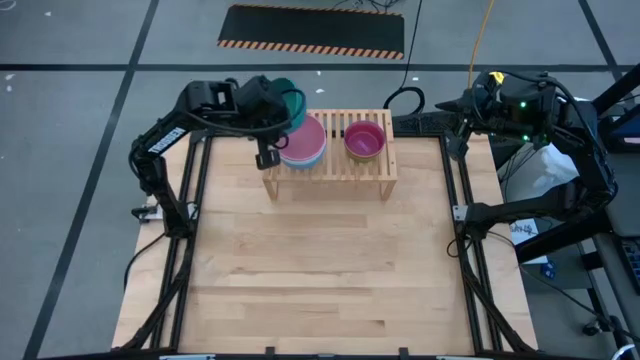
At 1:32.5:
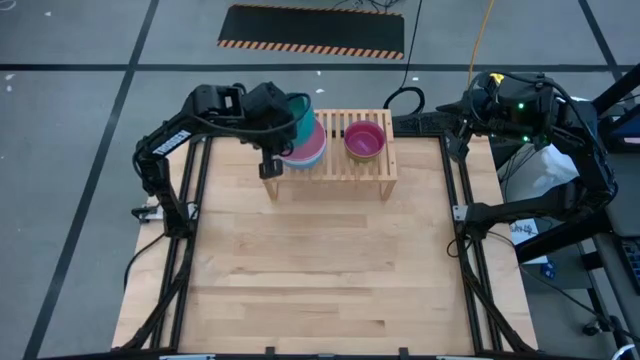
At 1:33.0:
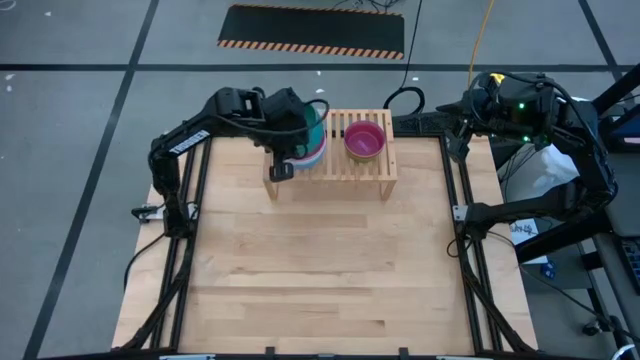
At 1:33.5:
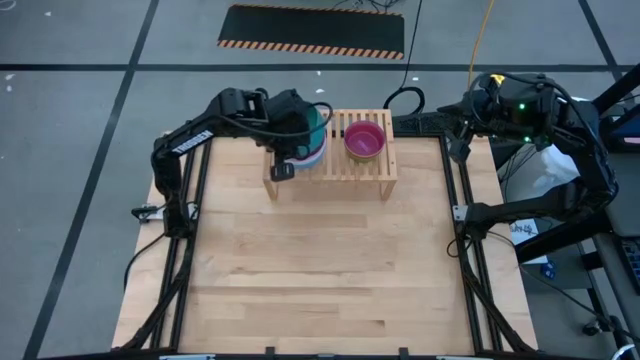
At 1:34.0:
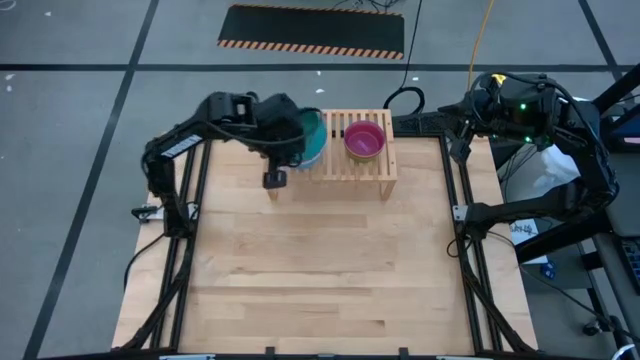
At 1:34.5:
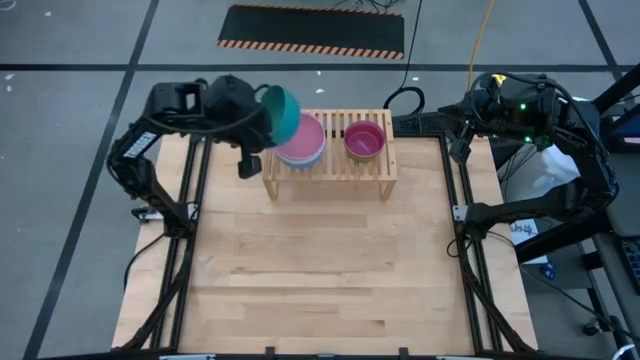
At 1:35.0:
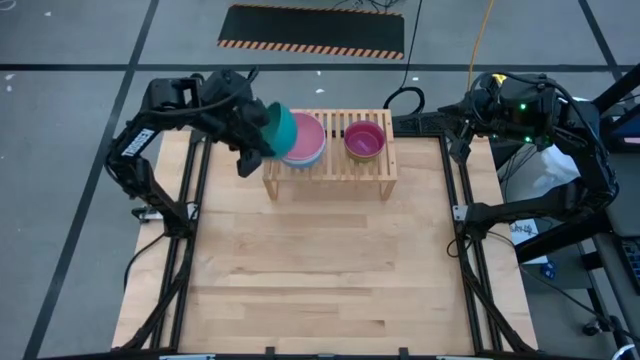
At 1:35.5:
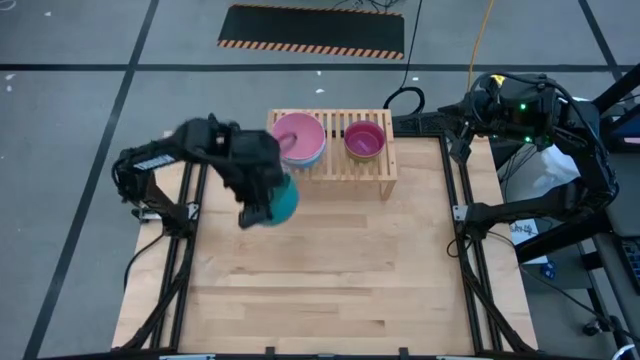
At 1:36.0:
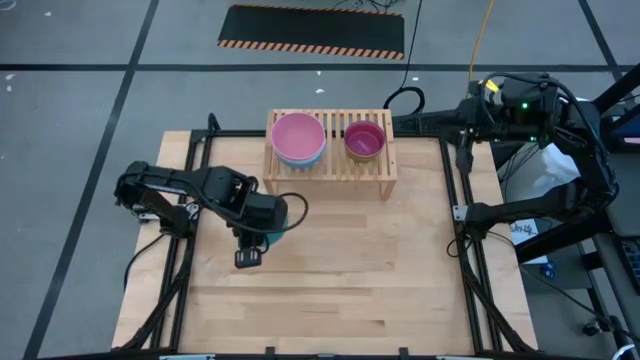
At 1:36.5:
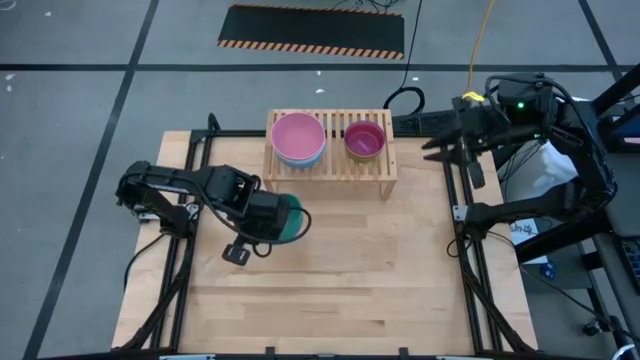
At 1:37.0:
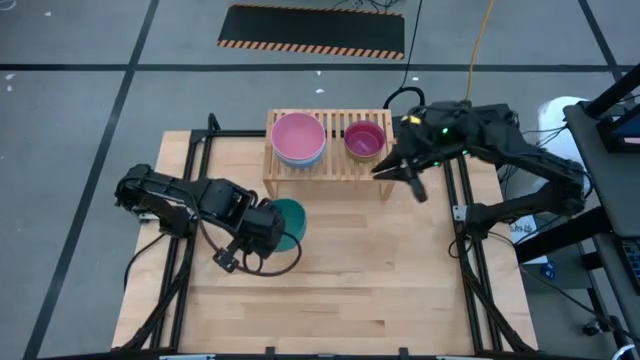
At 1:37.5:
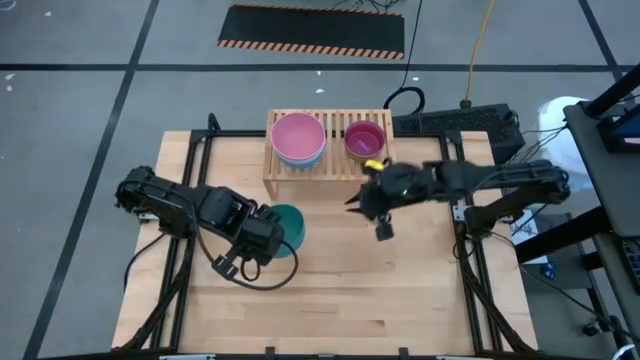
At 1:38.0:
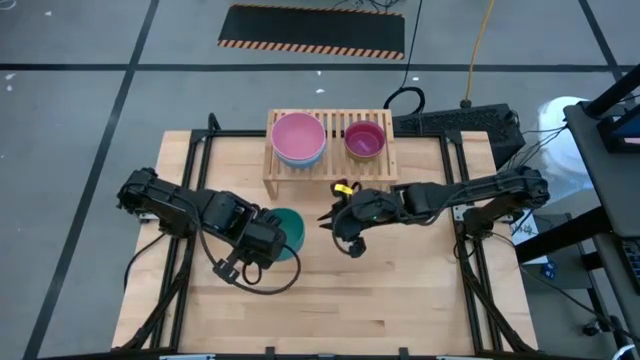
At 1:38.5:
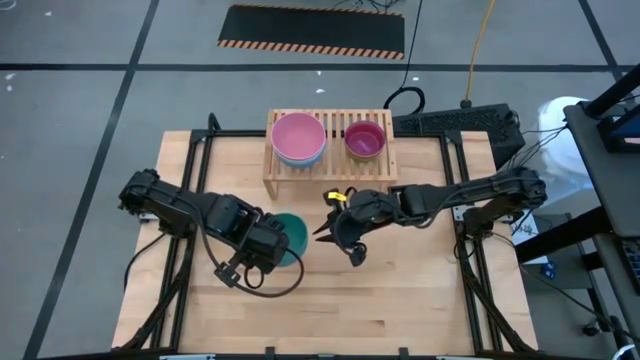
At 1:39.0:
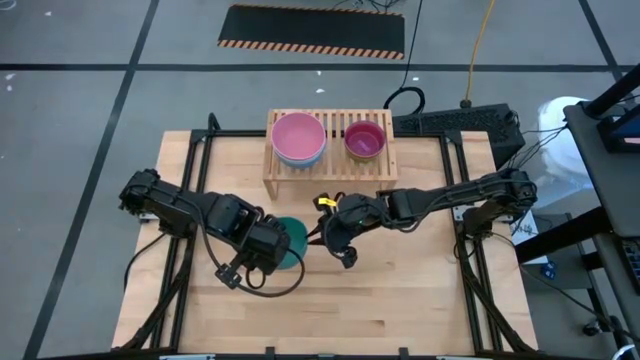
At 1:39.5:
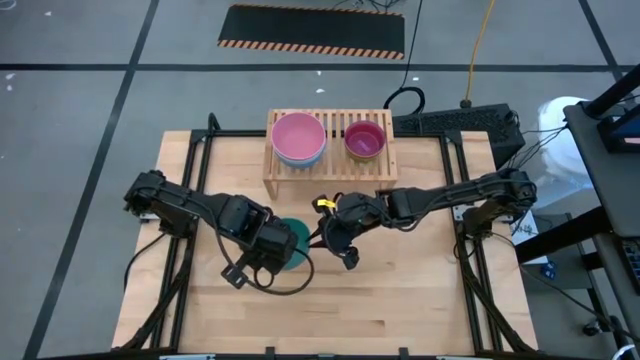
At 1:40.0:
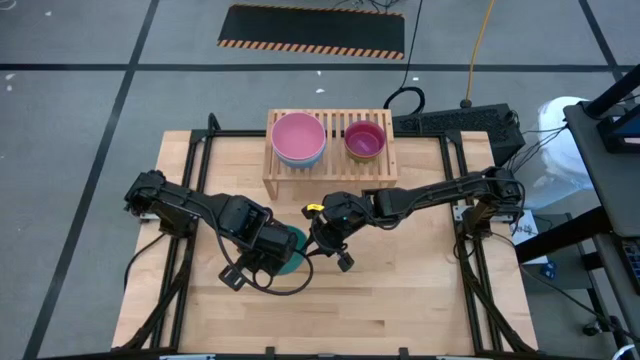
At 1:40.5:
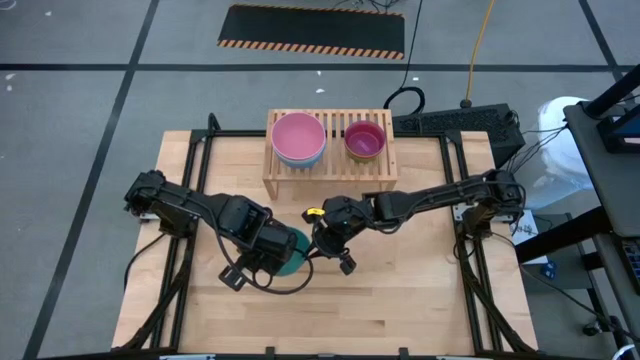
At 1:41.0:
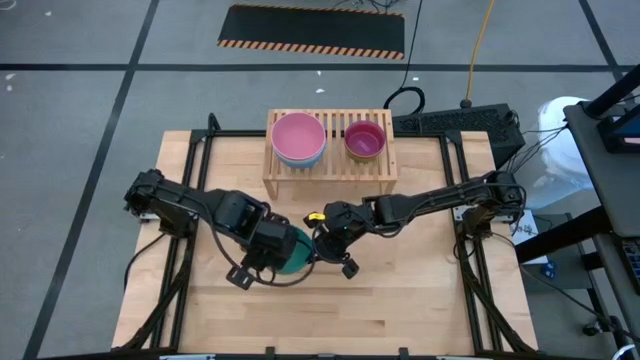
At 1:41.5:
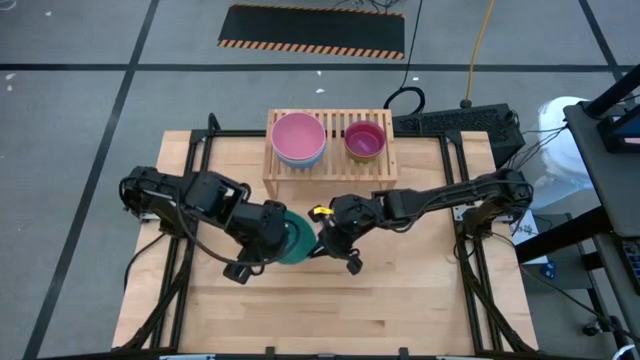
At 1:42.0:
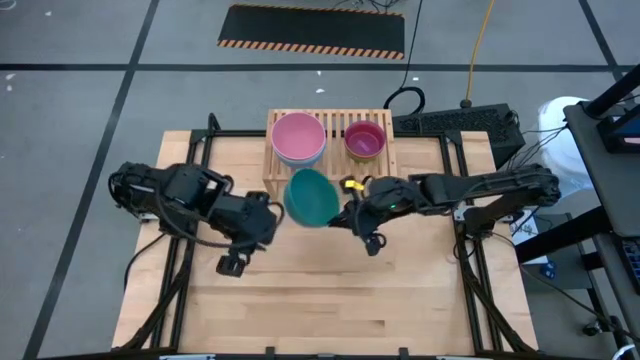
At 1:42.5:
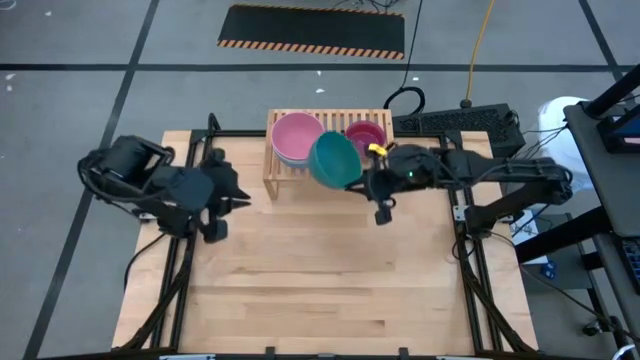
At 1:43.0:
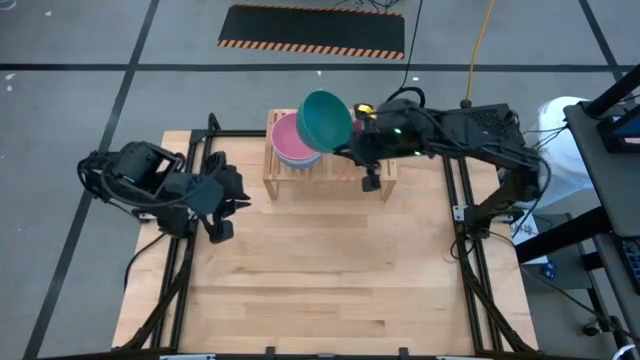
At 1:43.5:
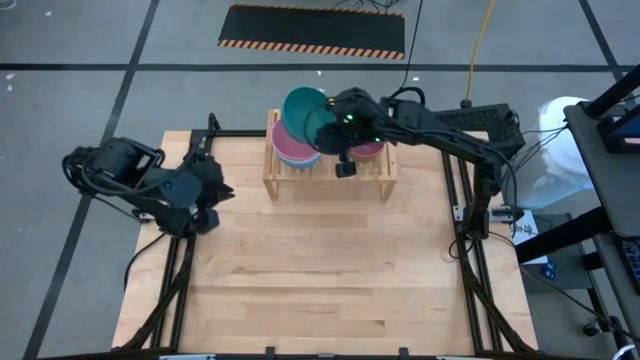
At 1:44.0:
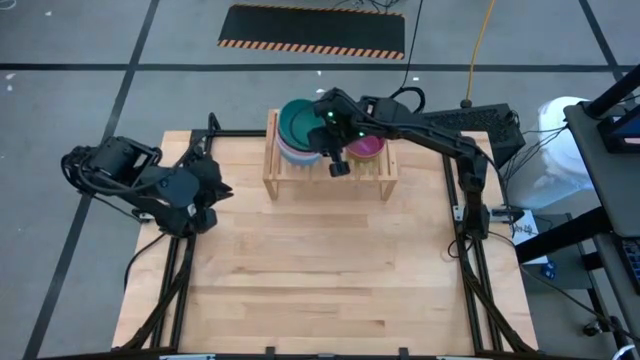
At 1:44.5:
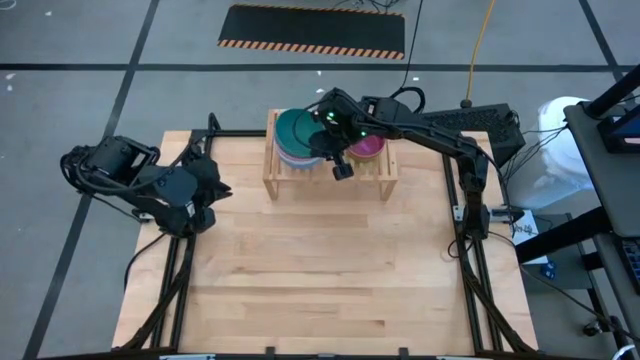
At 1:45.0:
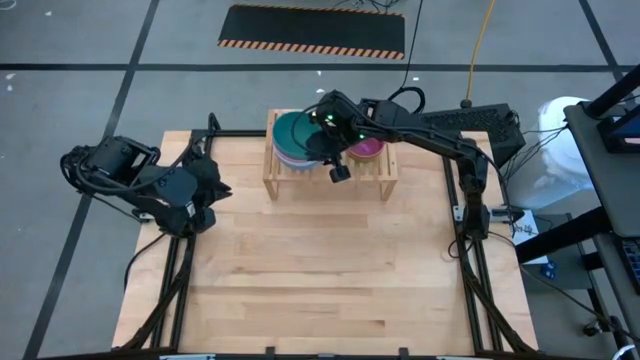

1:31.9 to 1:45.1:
Task: Place and stack bowls onto a shelf
Stack the dark green bowl on top of the pink bowl on the shelf

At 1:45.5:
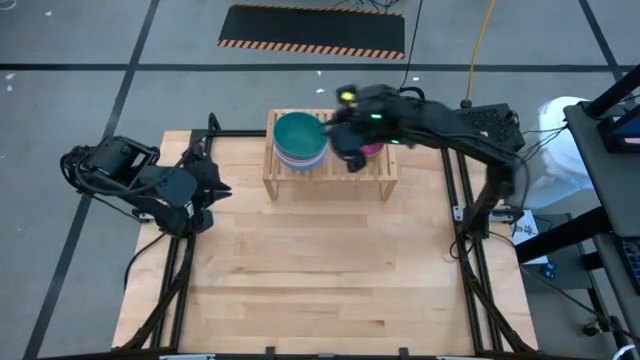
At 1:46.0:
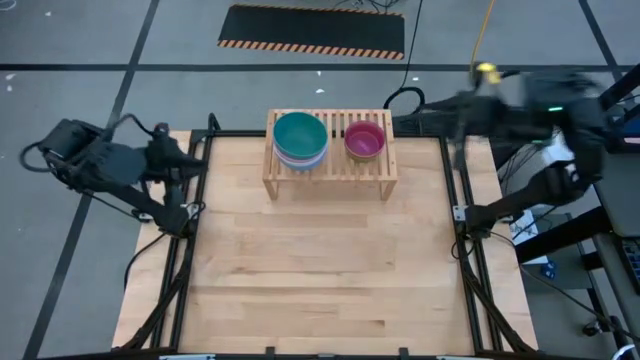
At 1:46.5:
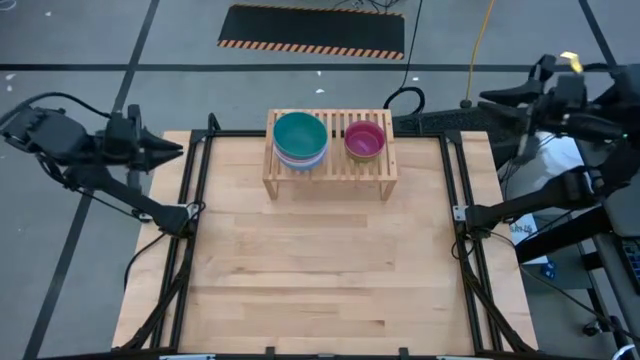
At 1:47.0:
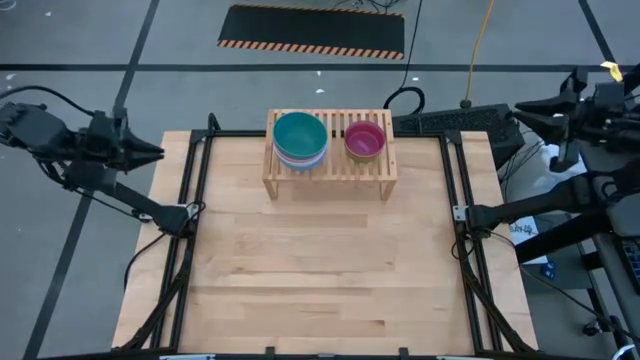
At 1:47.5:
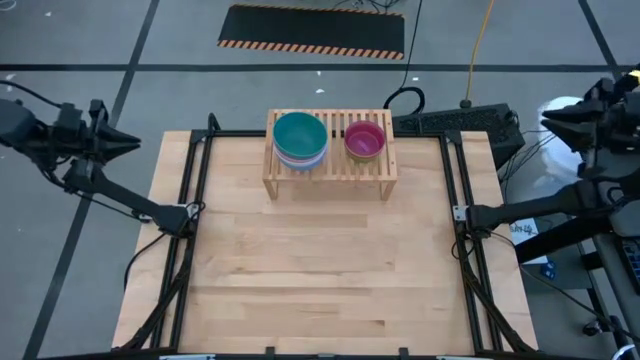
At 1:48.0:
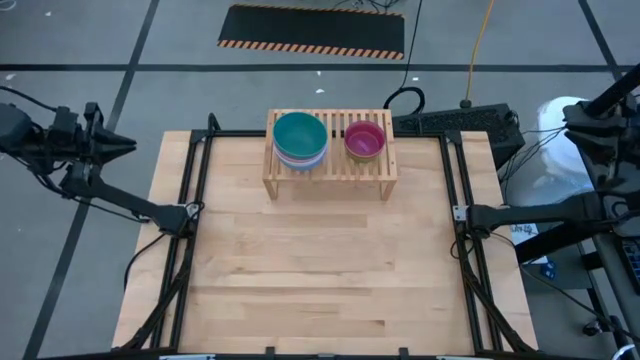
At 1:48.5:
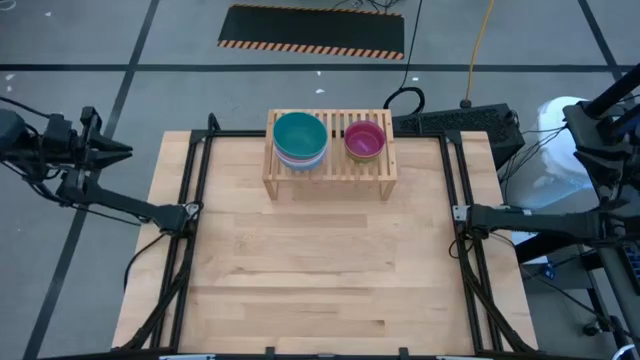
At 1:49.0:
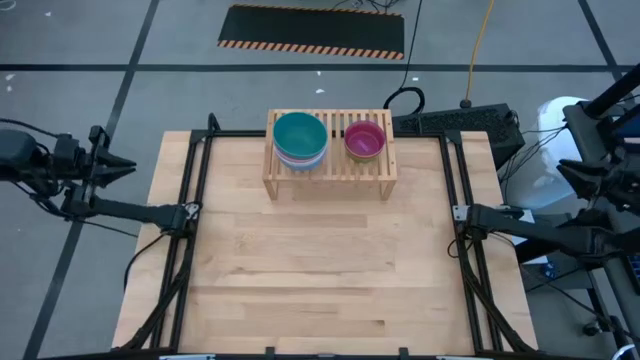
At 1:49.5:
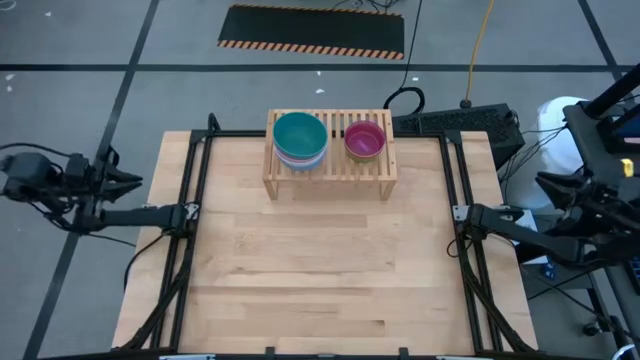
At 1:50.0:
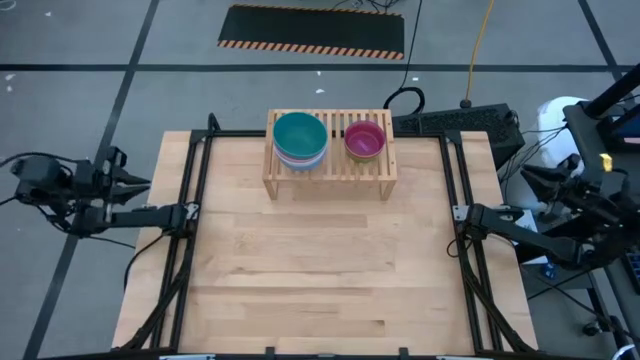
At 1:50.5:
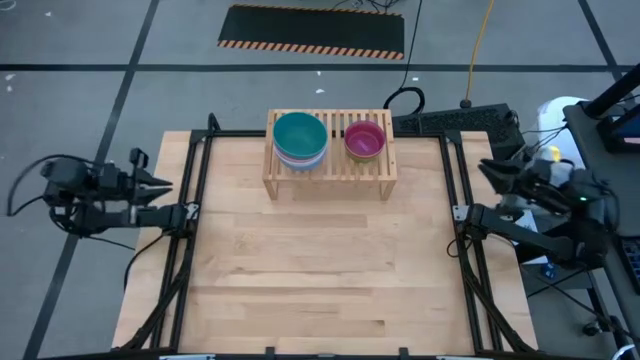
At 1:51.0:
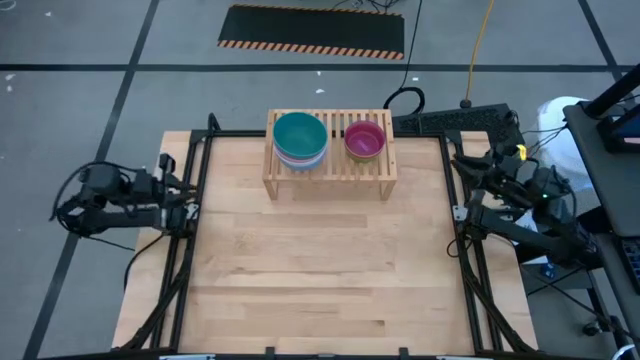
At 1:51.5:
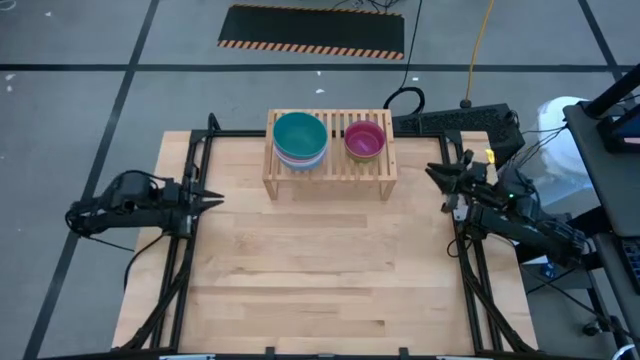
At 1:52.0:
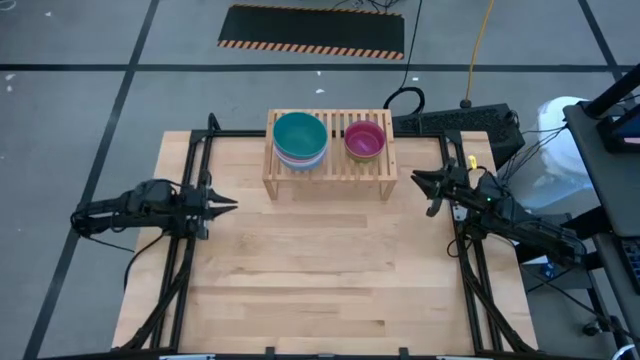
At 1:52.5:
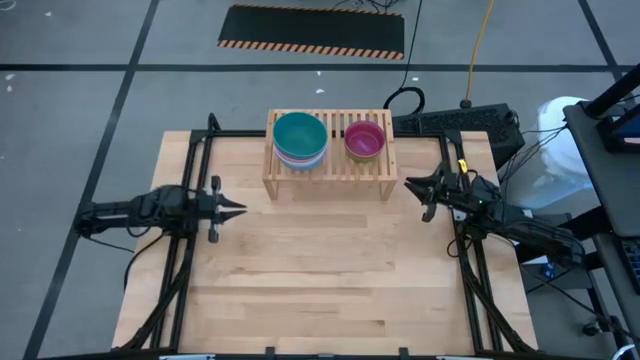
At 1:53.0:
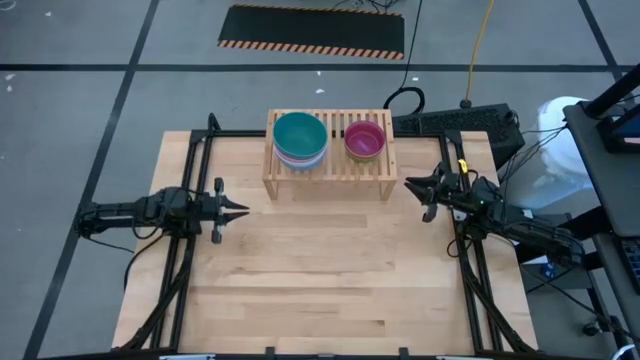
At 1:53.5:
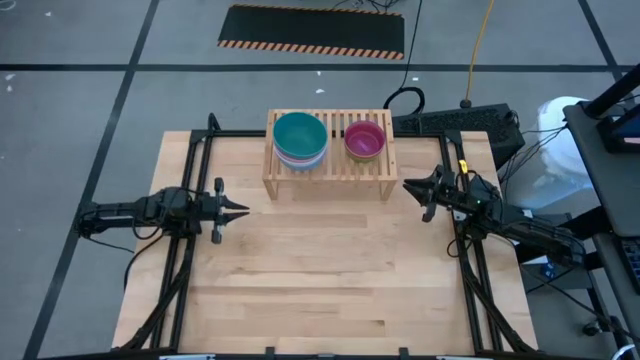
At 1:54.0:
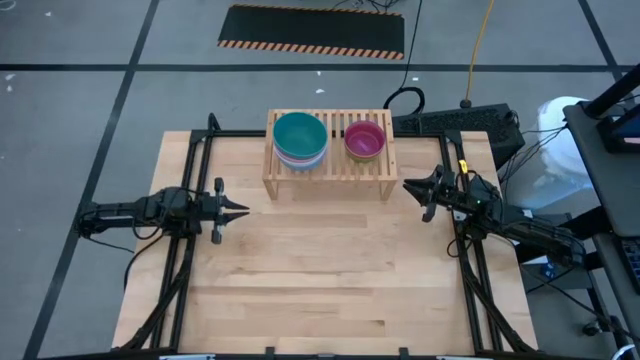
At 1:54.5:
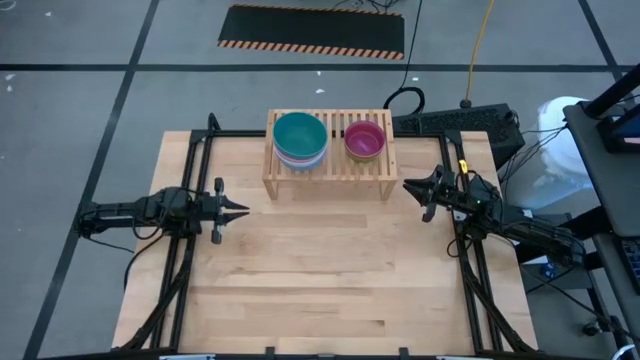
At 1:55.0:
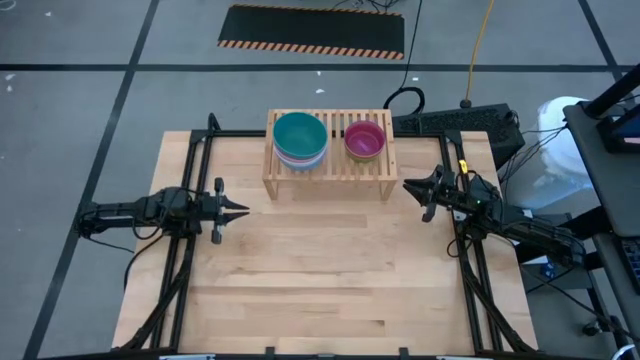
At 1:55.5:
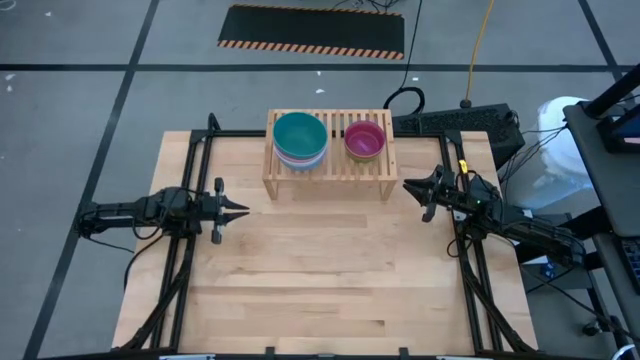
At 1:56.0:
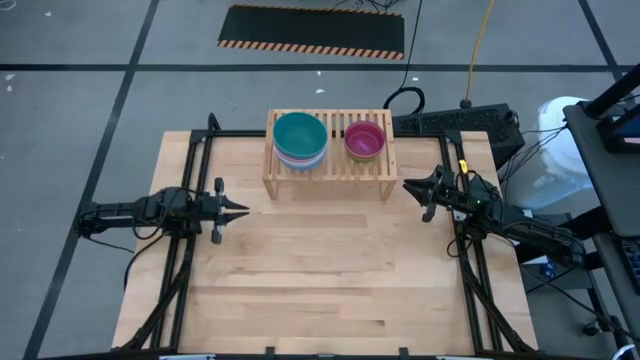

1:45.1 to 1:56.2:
Return to Home Position
